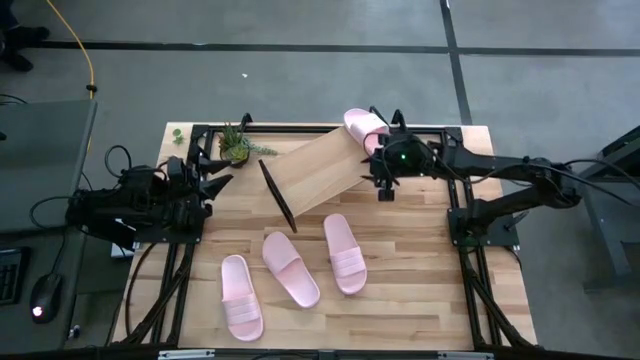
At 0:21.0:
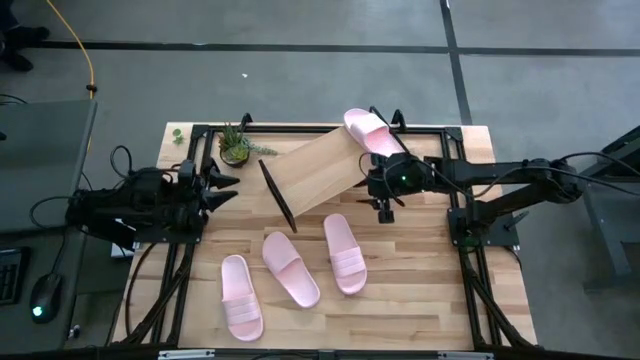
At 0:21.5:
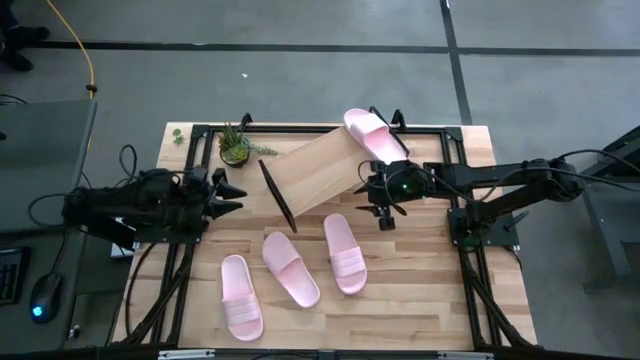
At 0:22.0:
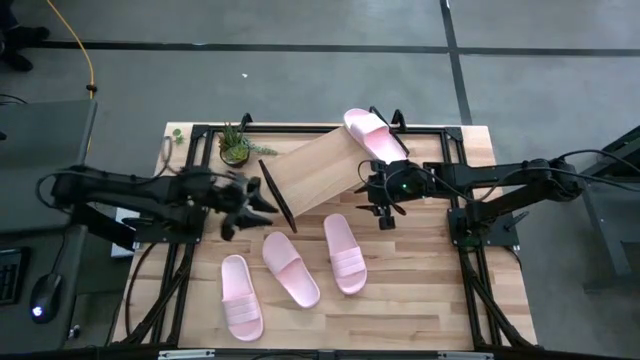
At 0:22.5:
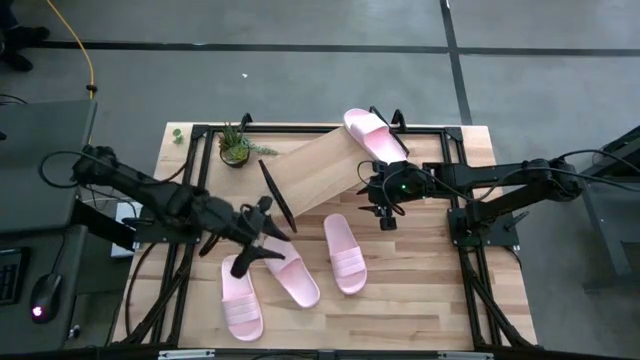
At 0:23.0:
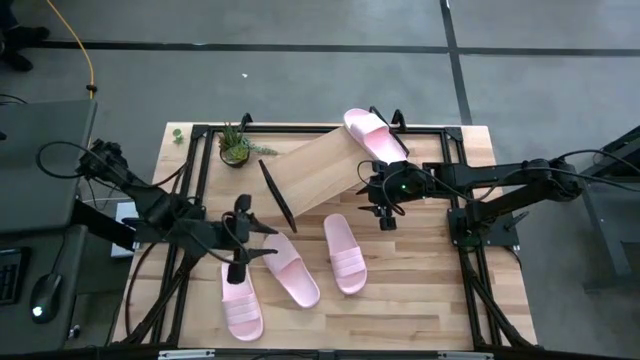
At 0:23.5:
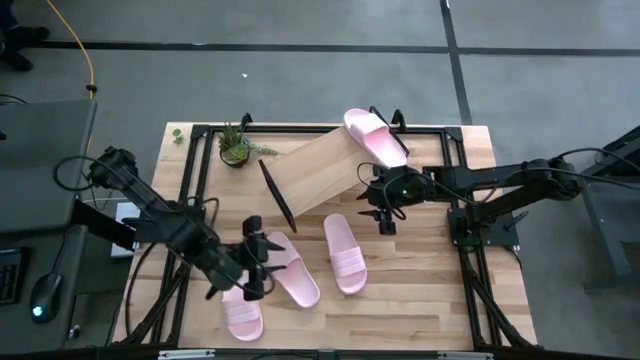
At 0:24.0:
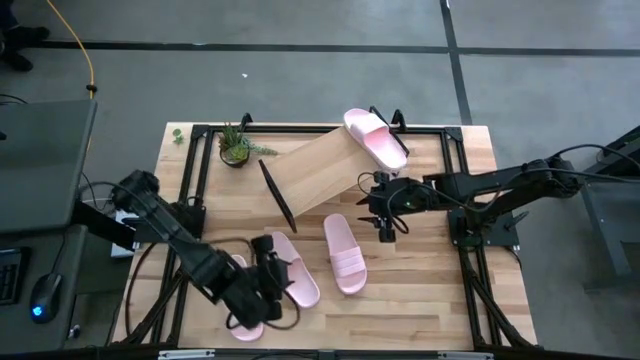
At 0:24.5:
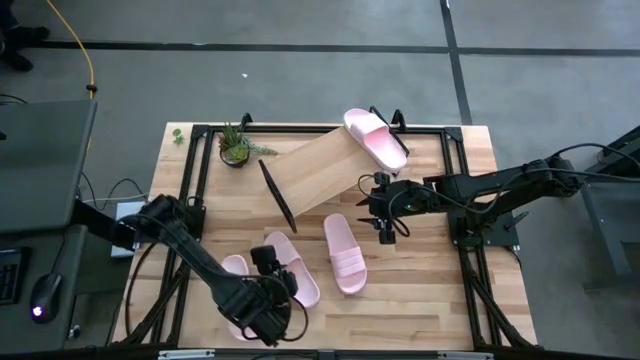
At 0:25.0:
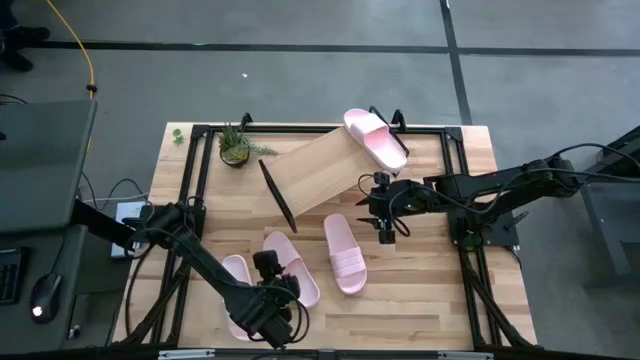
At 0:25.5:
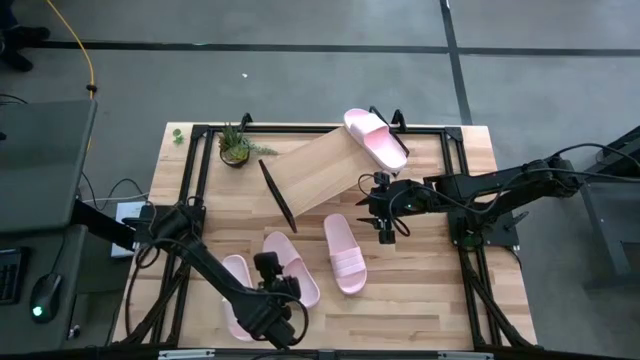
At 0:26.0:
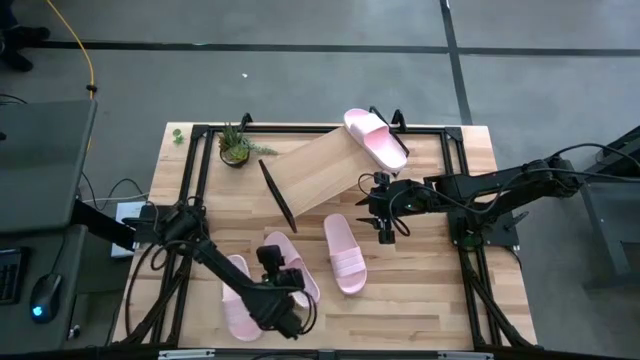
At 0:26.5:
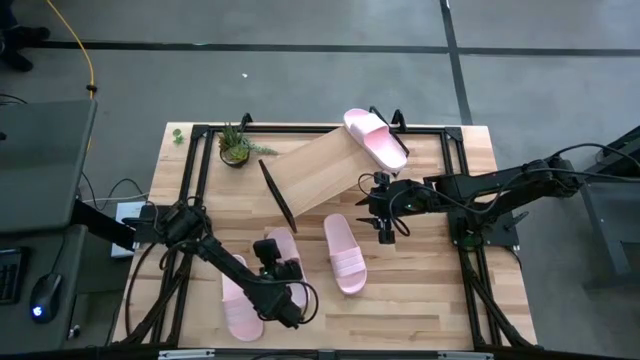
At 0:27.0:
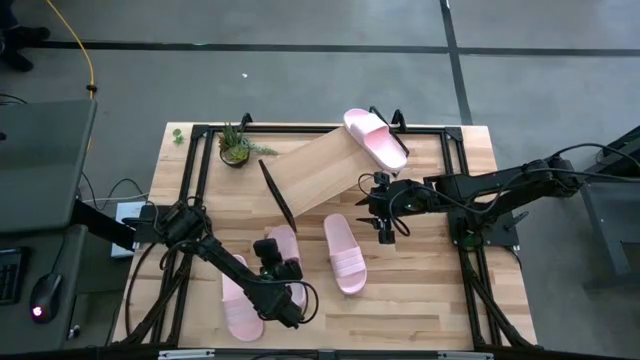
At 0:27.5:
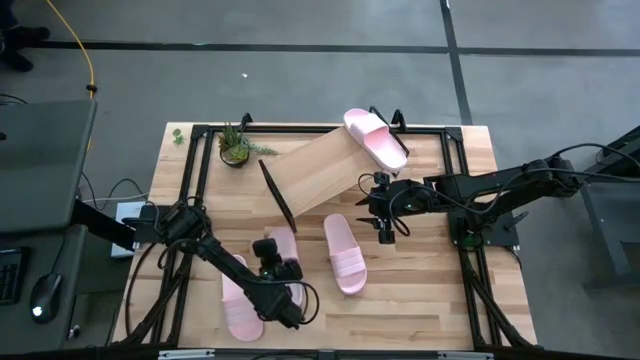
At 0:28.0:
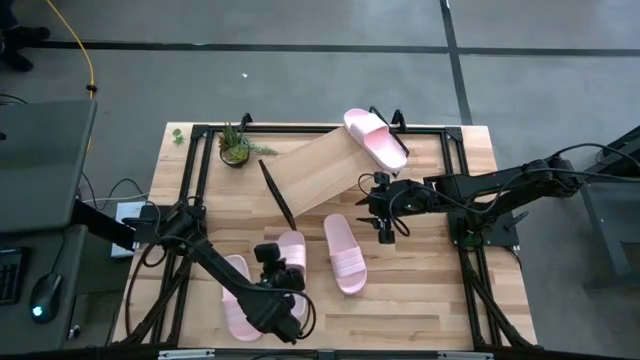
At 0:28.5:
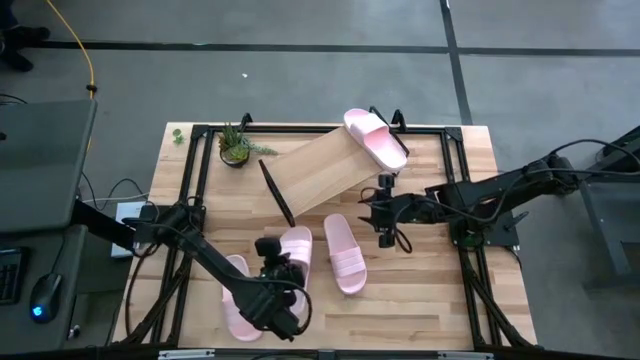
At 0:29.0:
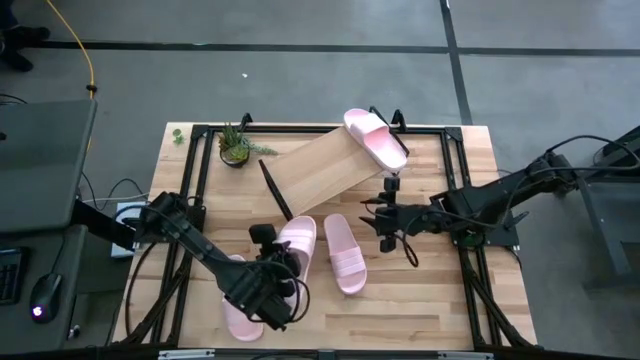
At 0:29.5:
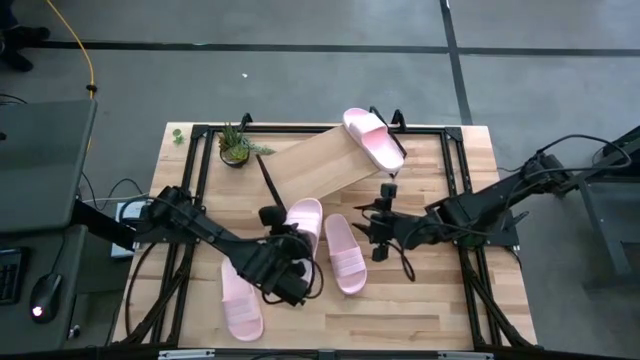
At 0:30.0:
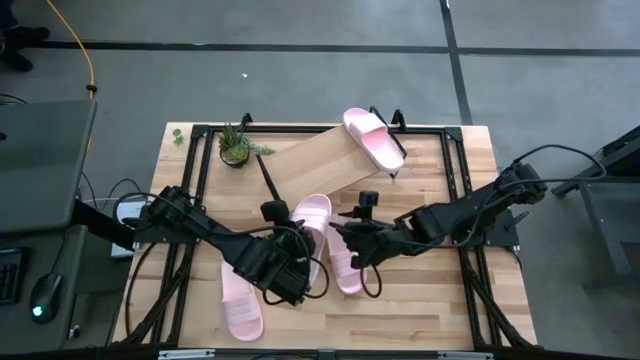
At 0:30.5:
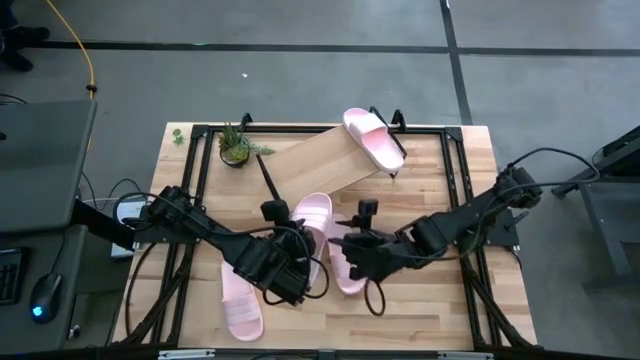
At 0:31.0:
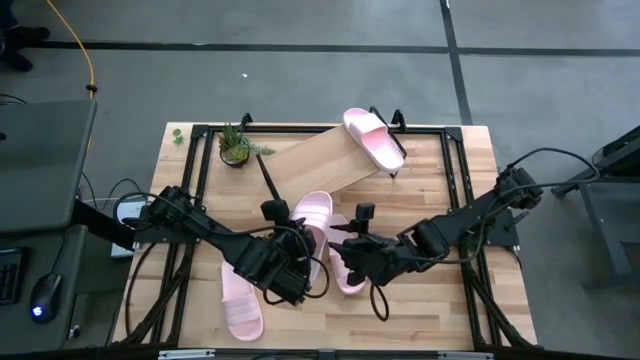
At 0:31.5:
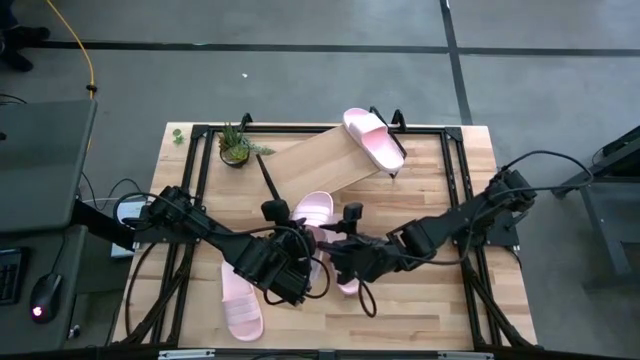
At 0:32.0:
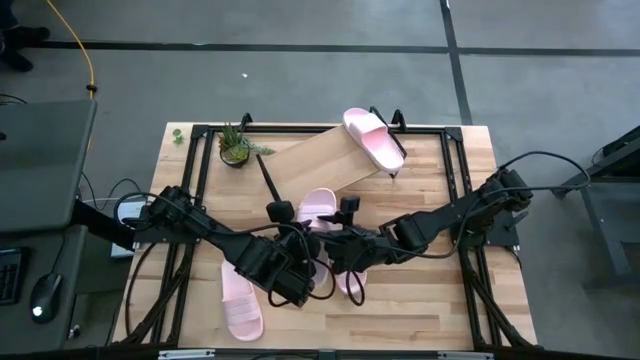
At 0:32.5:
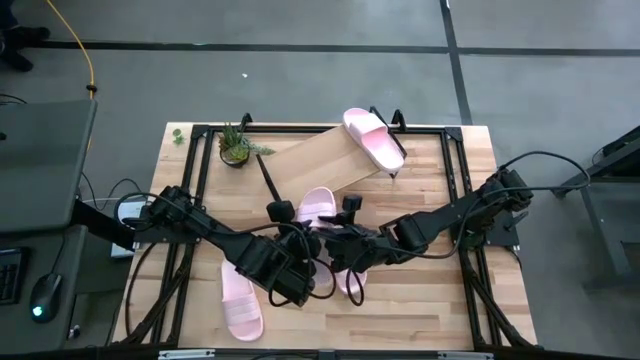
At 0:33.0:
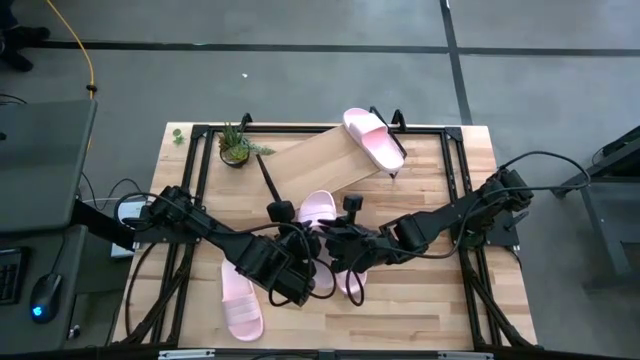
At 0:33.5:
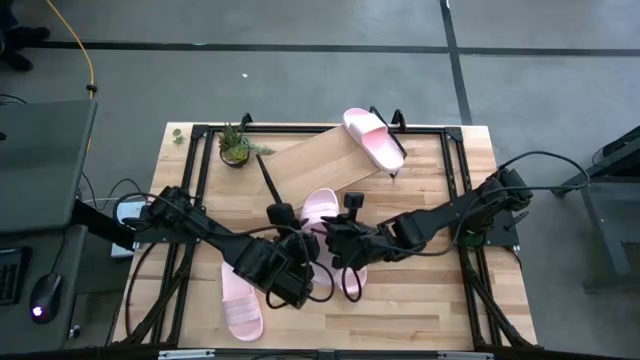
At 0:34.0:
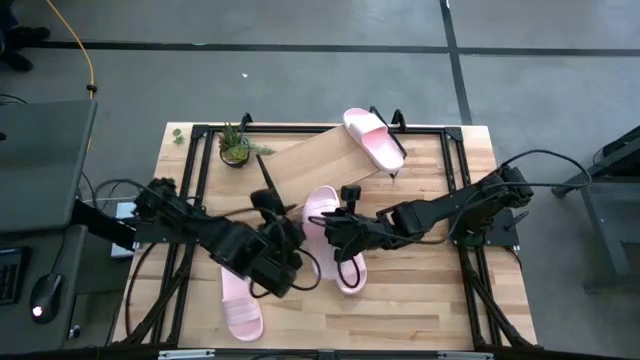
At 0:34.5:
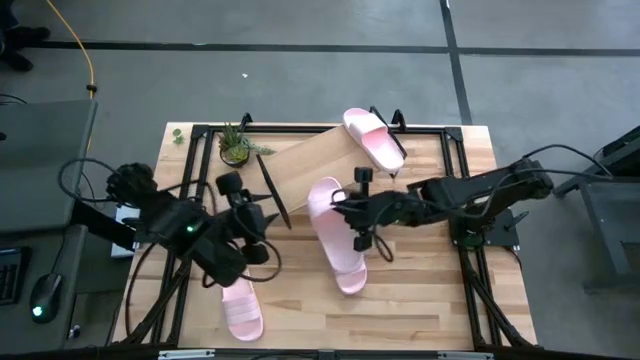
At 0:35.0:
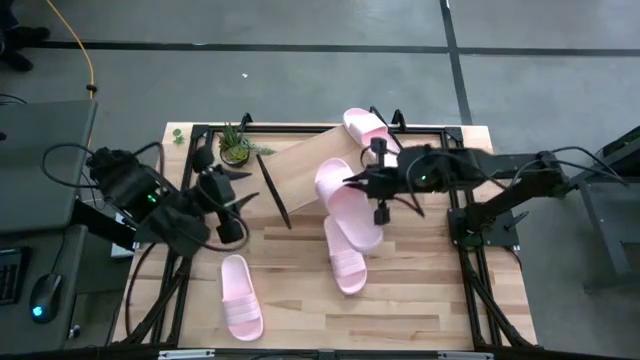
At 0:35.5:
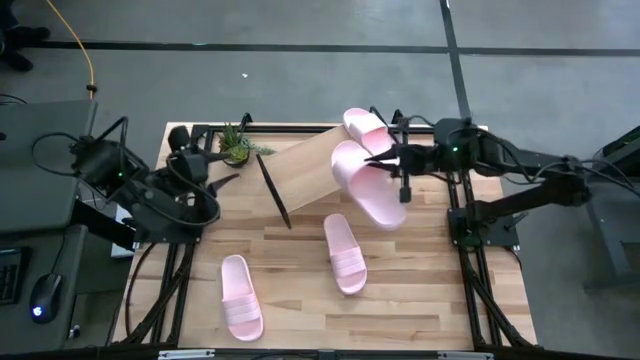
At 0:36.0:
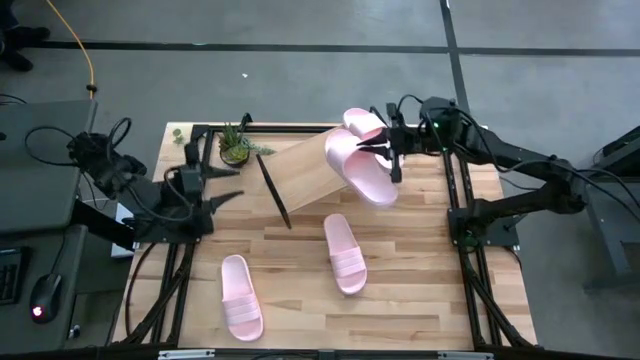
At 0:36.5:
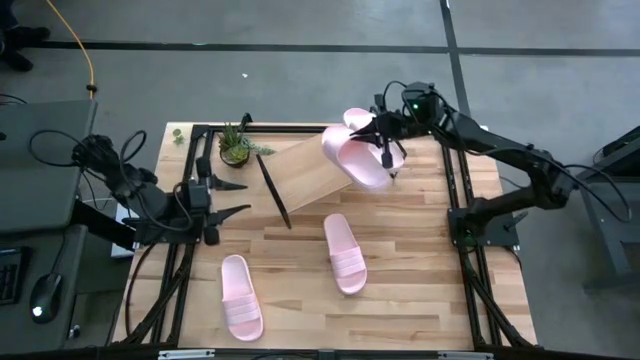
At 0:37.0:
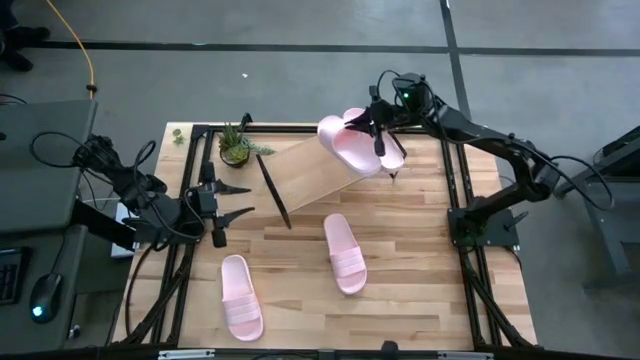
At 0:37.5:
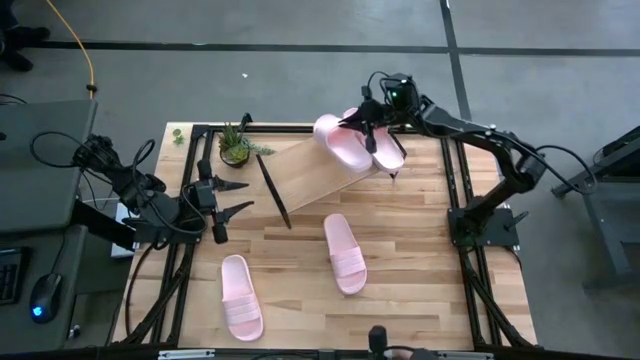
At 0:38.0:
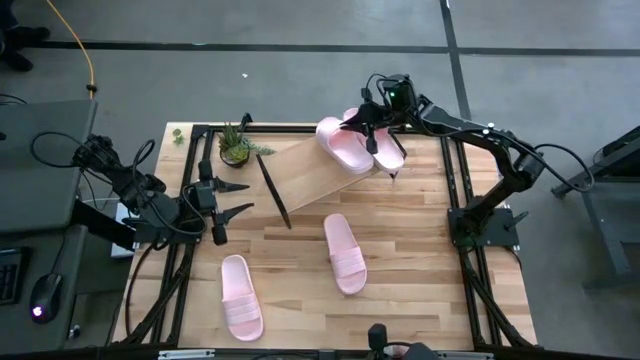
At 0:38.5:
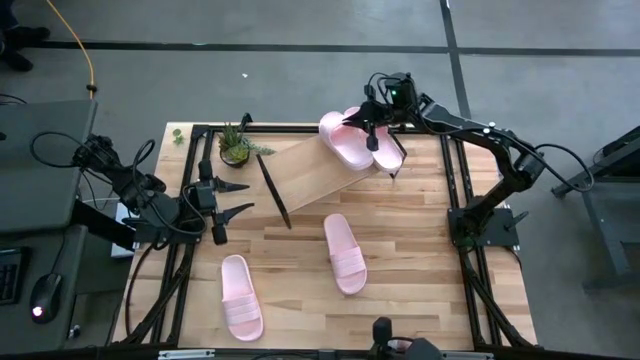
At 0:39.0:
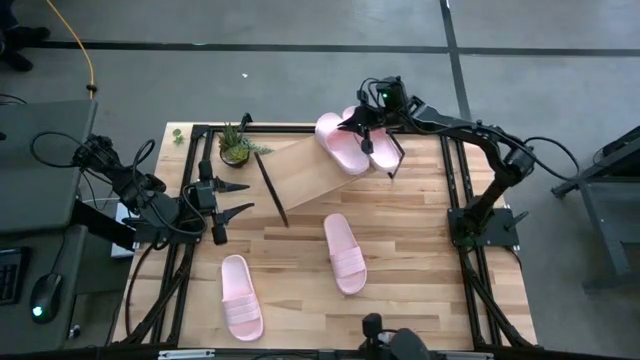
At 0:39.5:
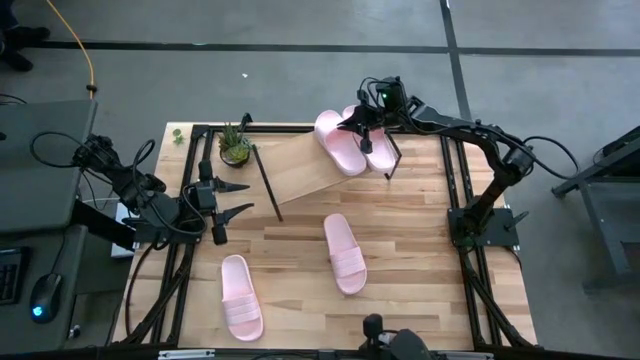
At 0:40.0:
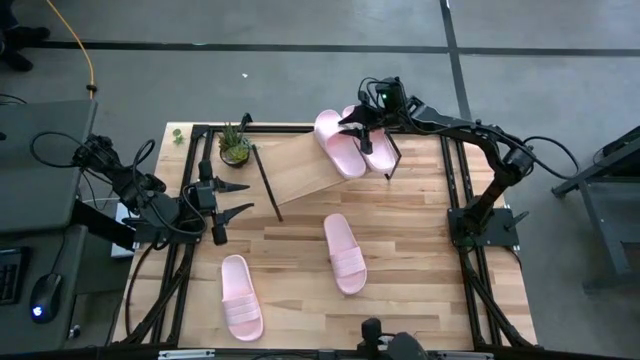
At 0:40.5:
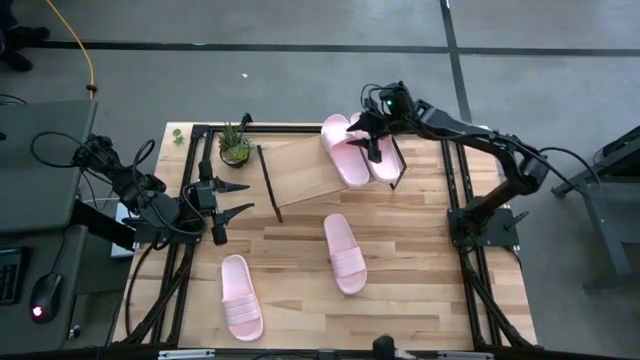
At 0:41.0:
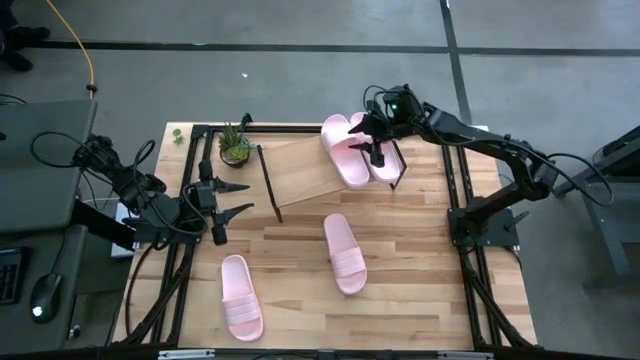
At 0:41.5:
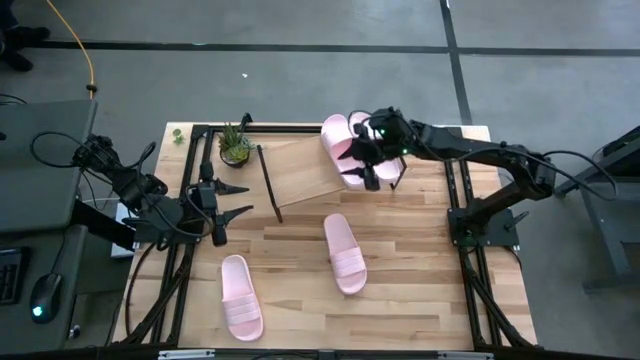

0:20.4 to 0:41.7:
Task: Pick and place slides into the shelf
Put the middle pink slide on the shelf
